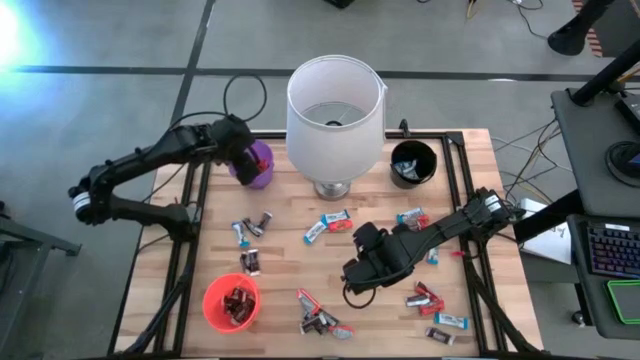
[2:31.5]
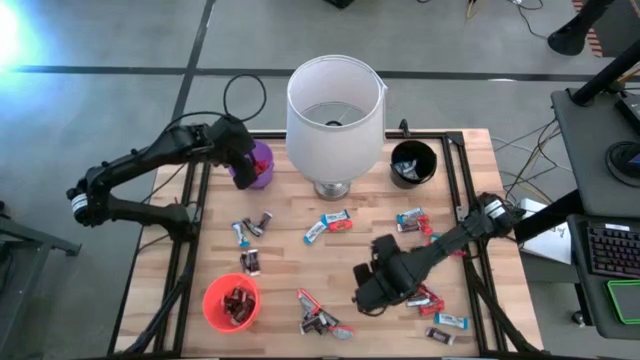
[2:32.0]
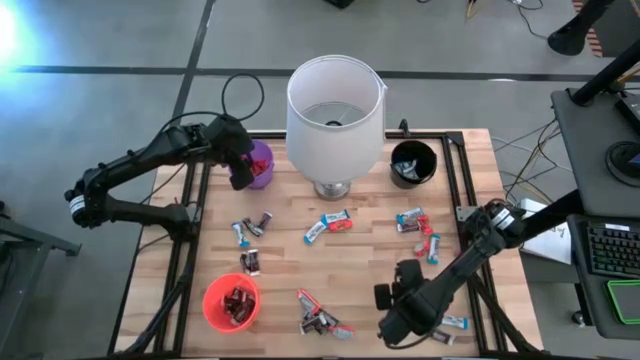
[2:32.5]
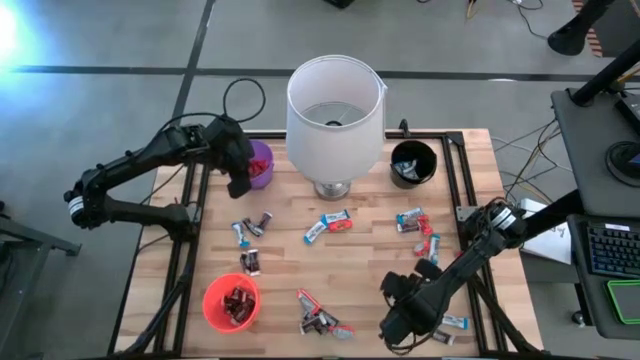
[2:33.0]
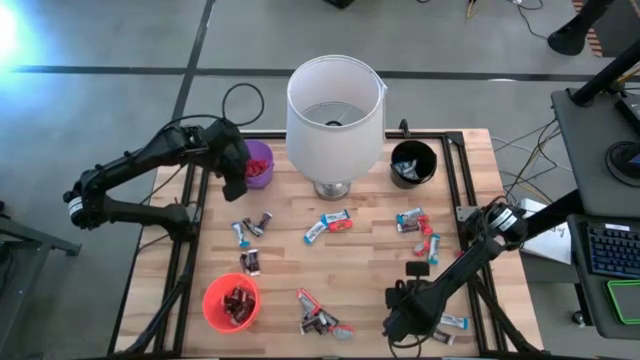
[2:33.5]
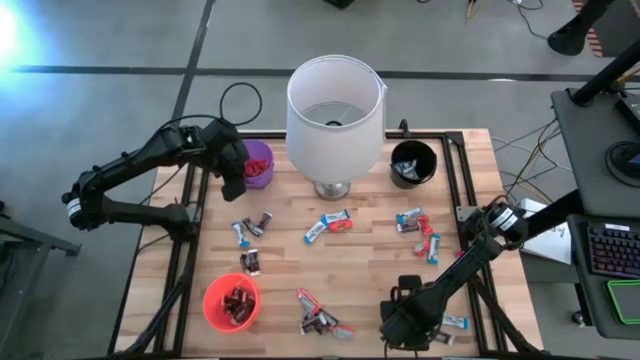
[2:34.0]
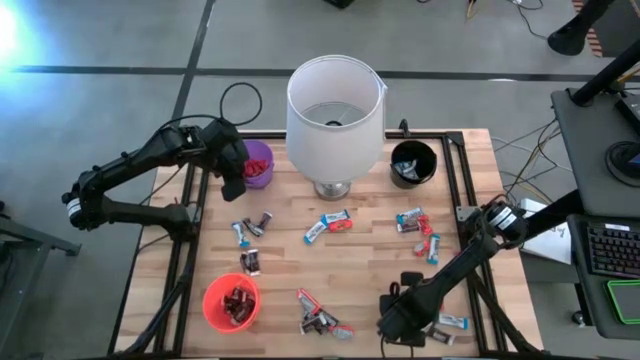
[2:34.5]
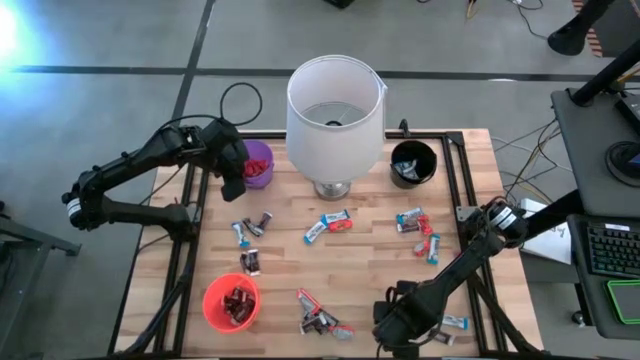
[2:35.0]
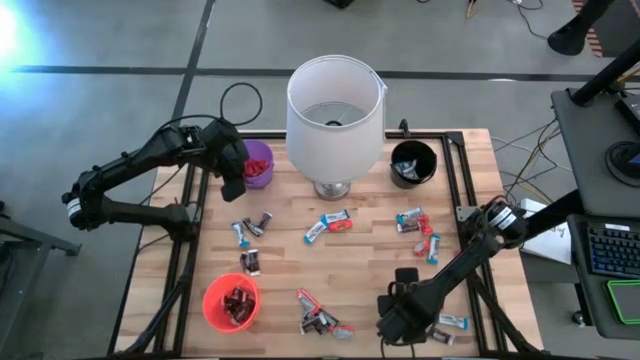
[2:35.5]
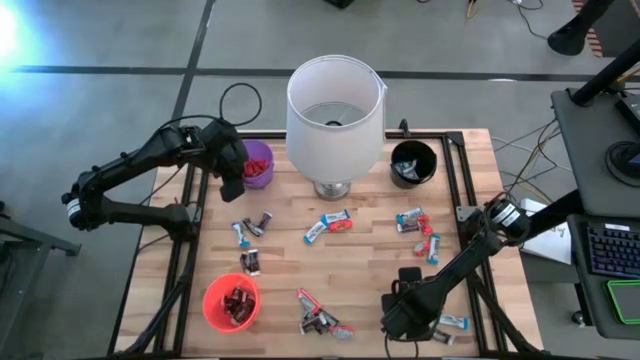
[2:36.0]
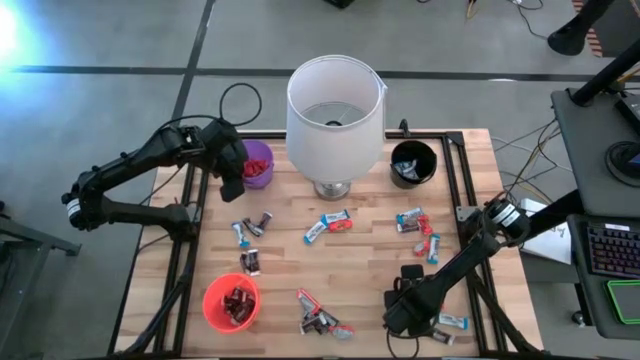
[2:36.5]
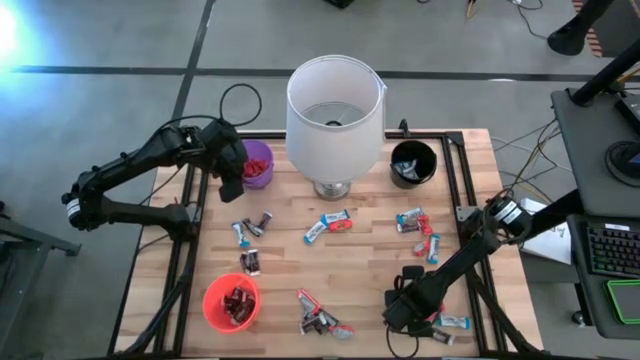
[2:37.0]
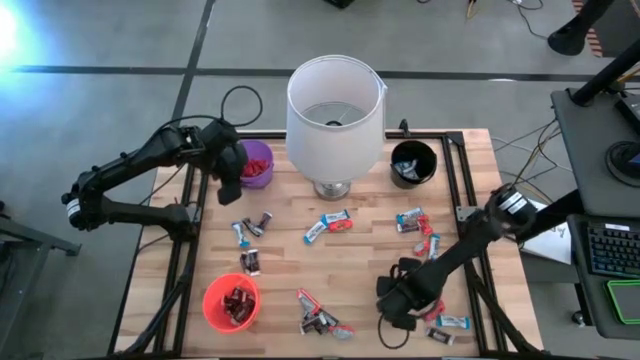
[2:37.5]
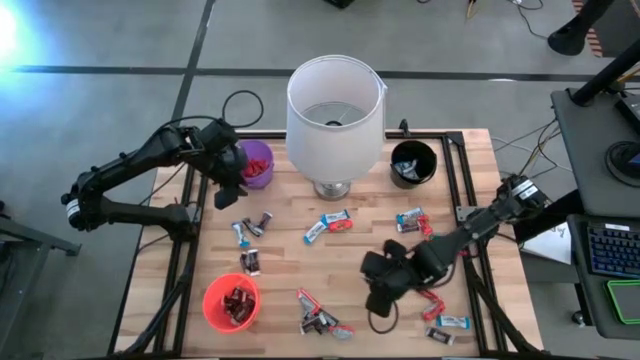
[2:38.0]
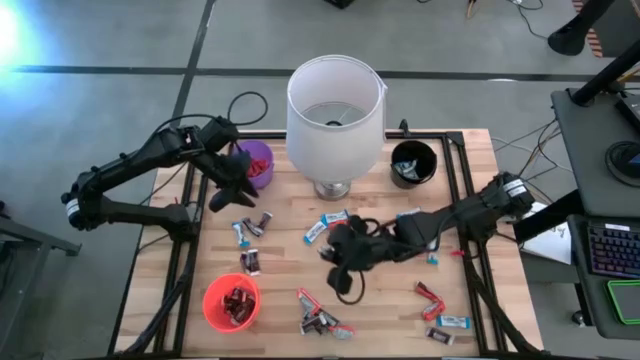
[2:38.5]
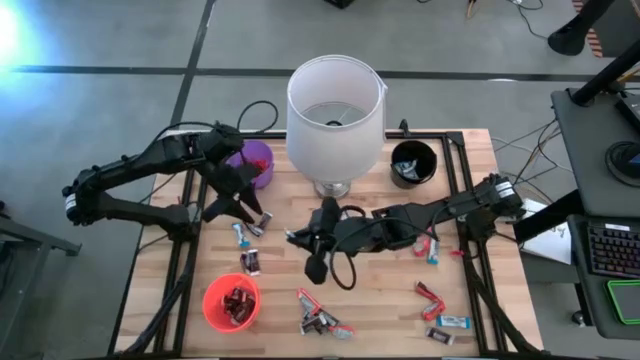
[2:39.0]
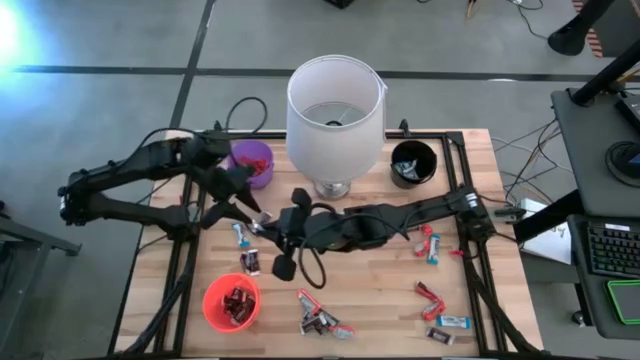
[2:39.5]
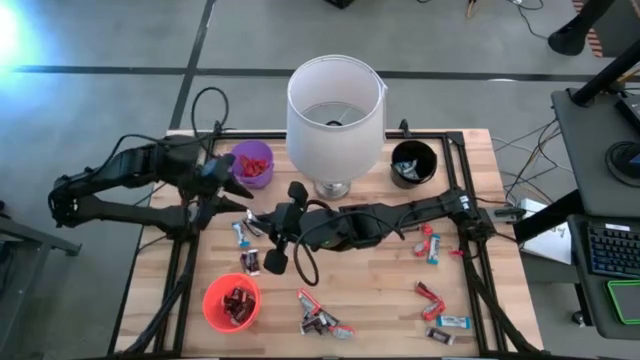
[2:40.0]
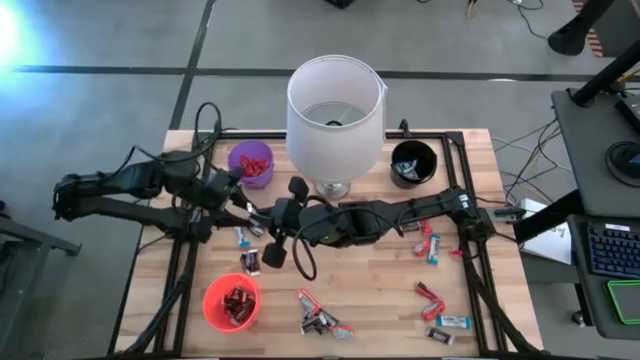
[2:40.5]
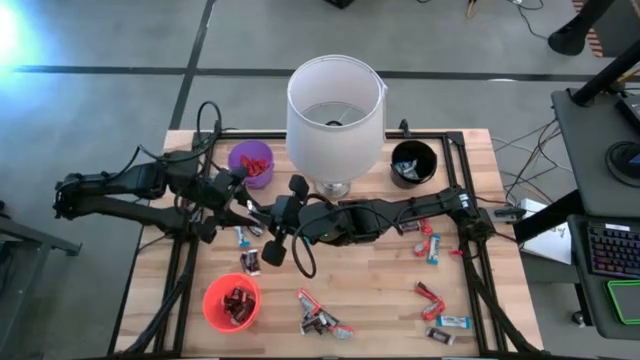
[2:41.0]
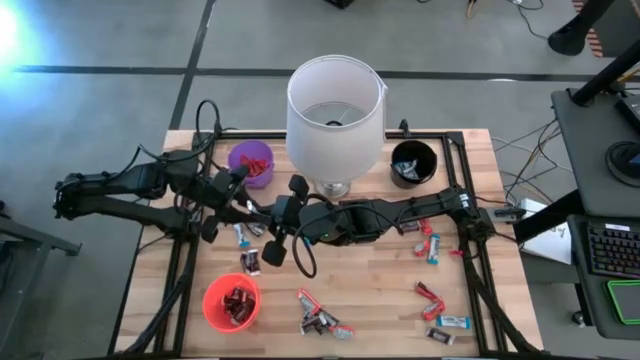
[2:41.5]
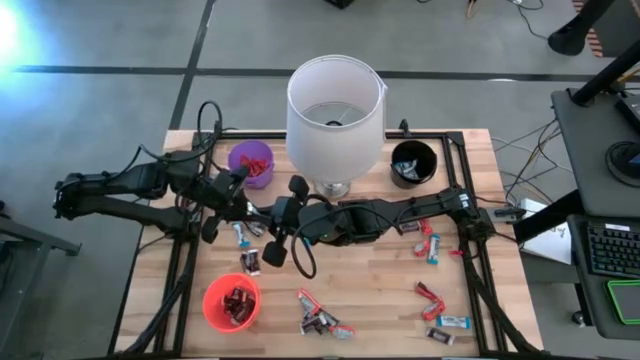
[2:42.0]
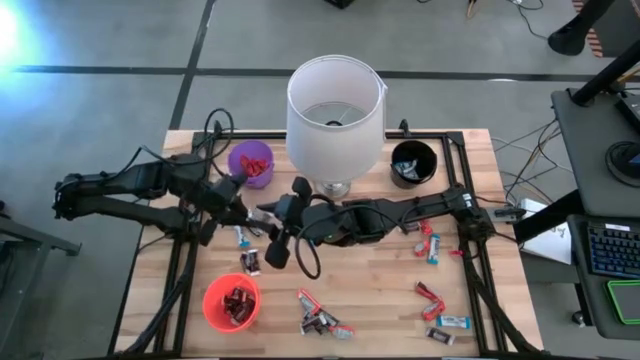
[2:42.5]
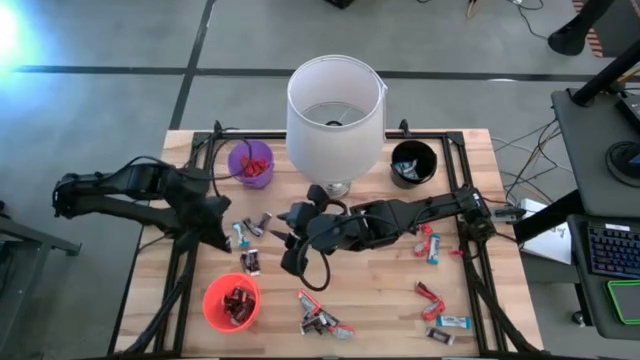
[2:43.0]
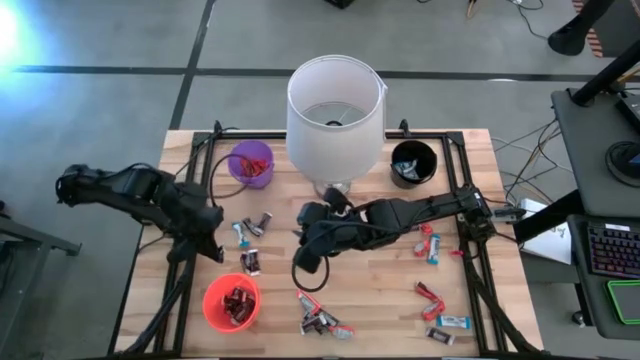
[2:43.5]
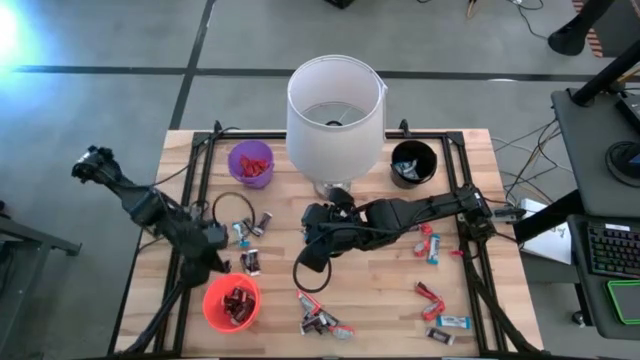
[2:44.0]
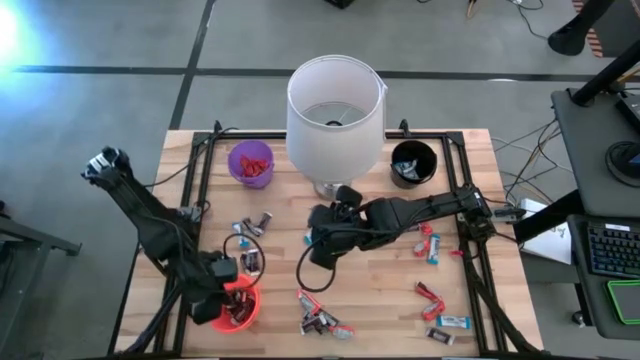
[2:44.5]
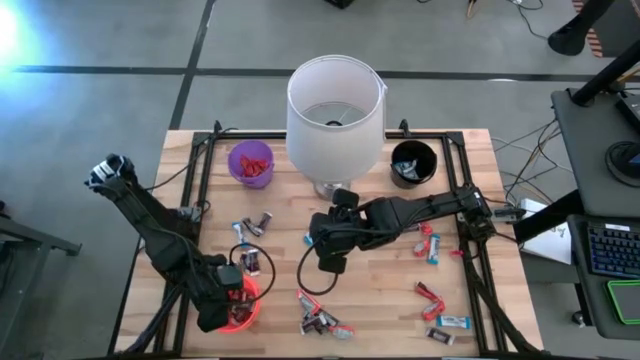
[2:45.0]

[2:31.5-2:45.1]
Task: Sort candy
Put the black chocolate into the orange bucket

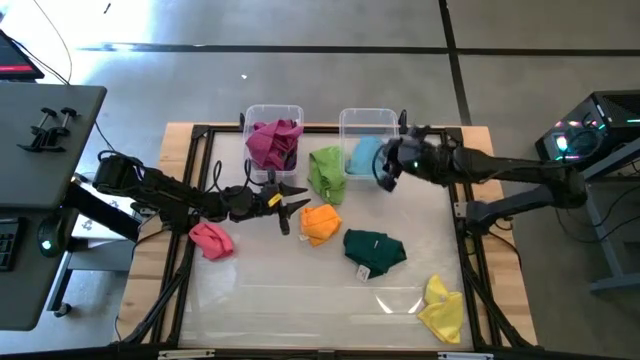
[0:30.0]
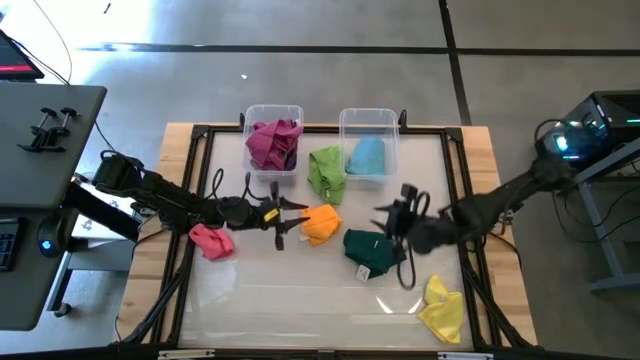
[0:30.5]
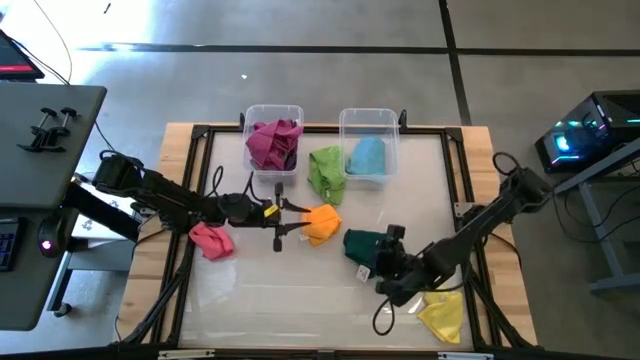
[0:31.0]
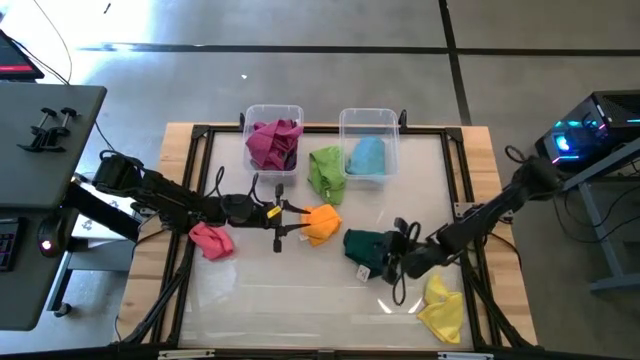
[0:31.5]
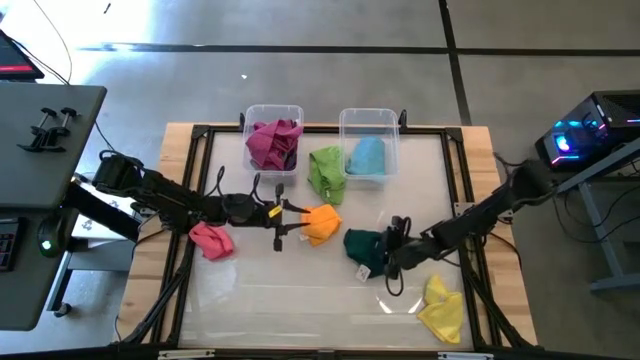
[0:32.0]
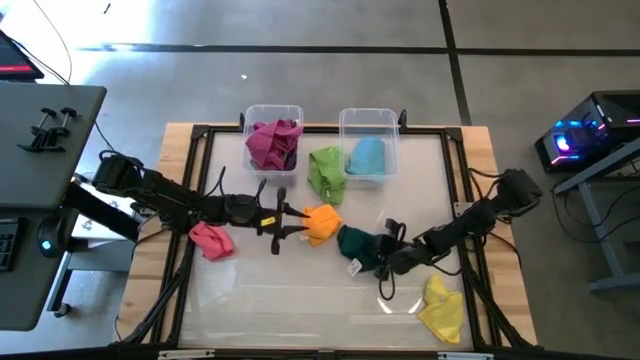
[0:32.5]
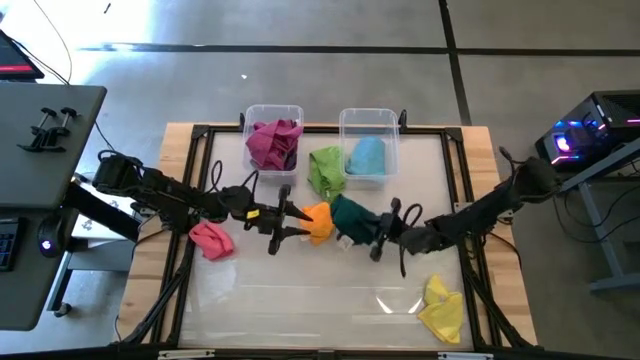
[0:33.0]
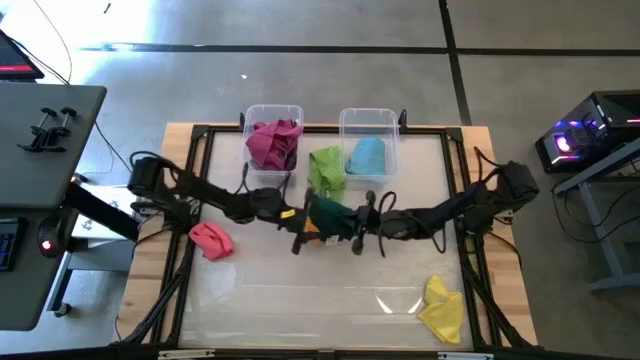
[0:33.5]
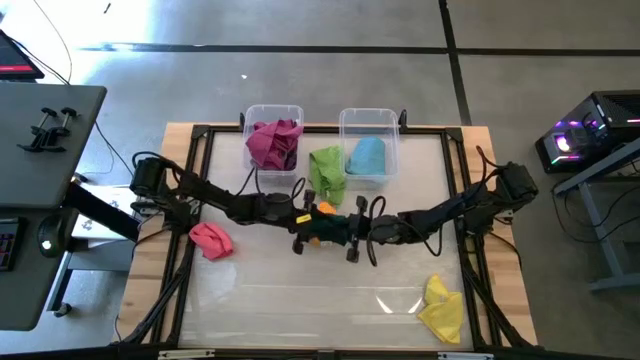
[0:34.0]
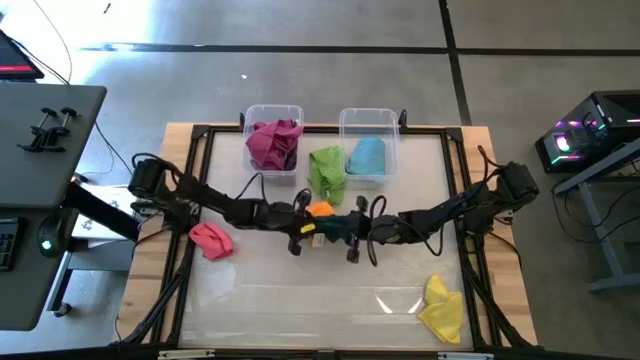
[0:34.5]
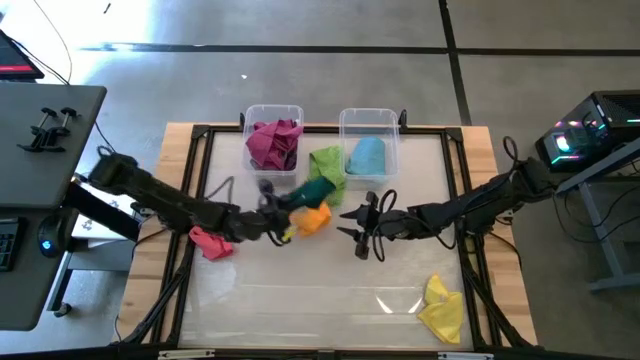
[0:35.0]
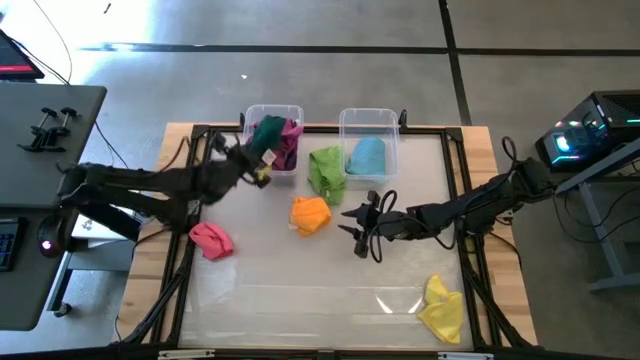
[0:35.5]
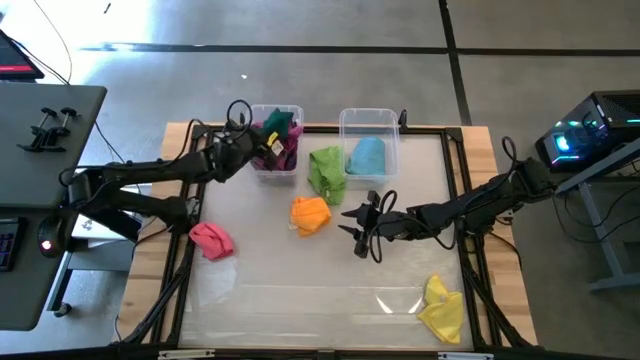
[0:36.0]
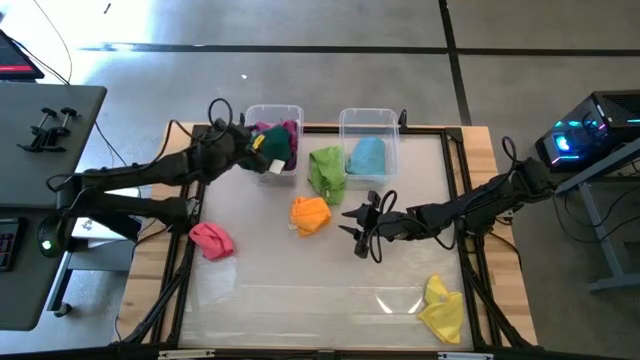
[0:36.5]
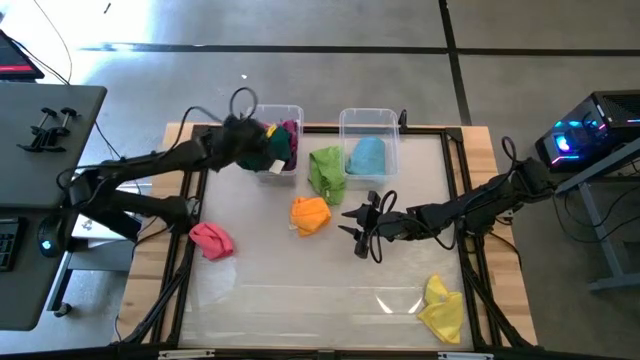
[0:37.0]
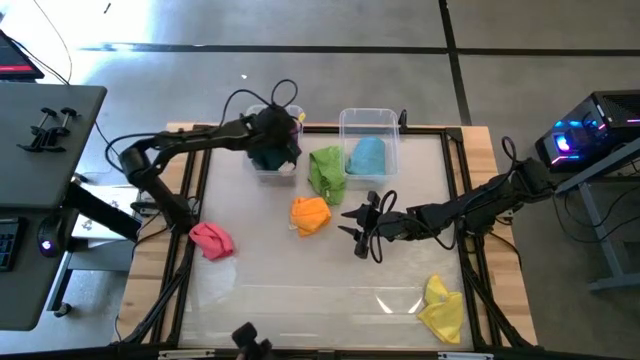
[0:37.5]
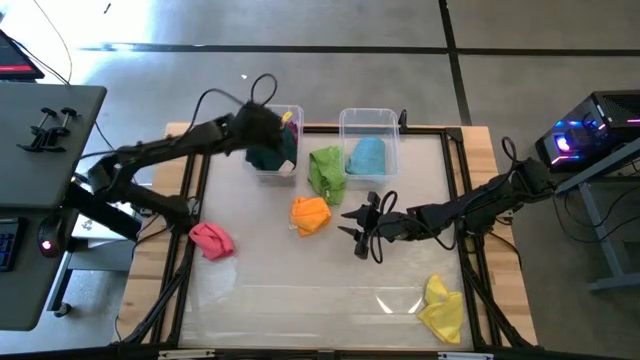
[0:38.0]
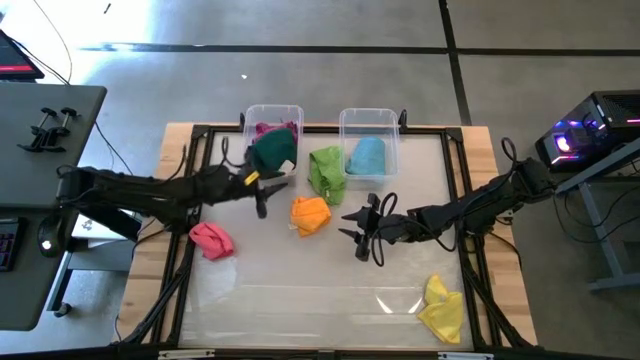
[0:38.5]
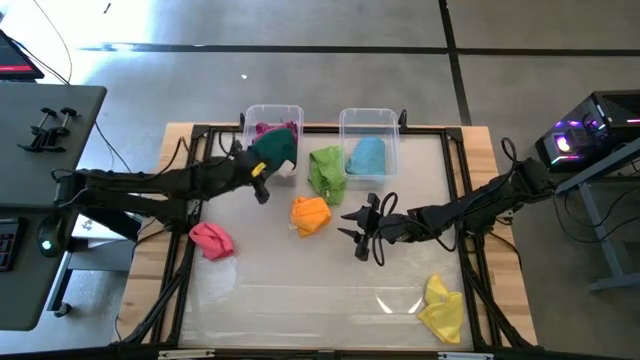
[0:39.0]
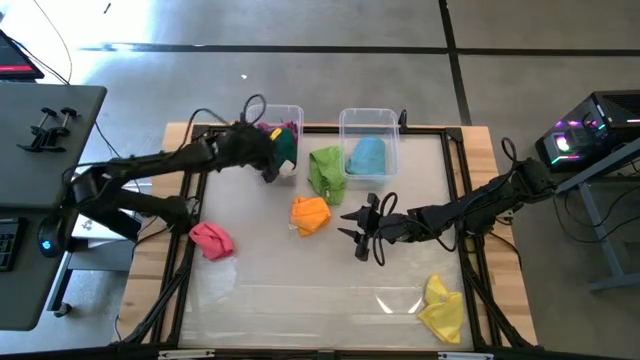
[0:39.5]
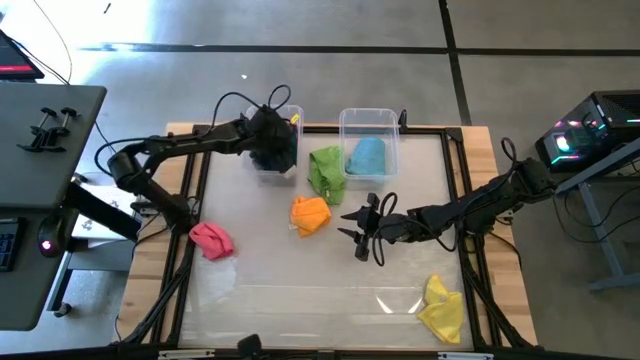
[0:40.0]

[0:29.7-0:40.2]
Task: Sort towels by color in basket
Put the dark green microfiber cloth into the left transparent bin
